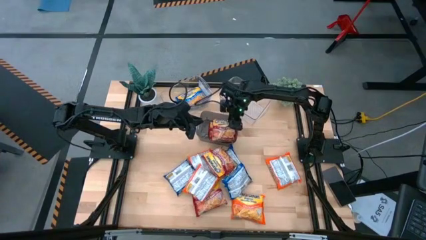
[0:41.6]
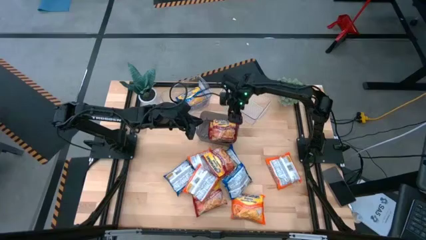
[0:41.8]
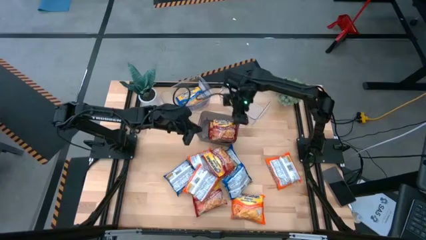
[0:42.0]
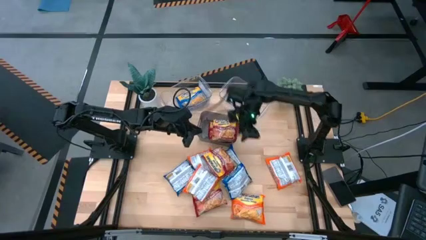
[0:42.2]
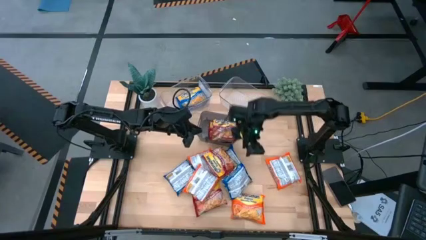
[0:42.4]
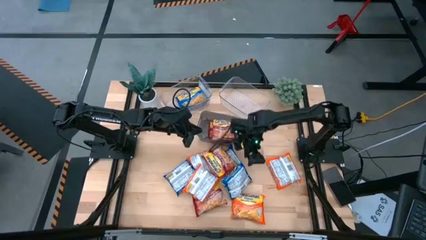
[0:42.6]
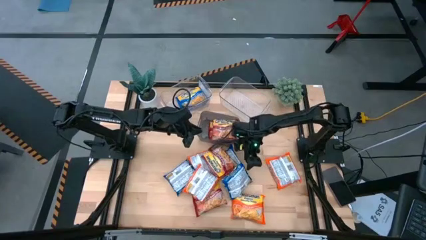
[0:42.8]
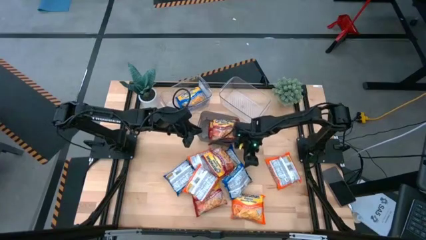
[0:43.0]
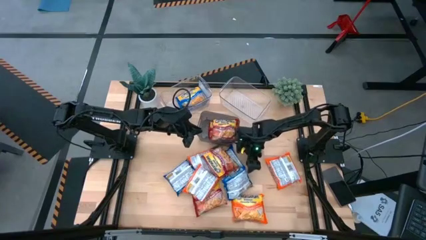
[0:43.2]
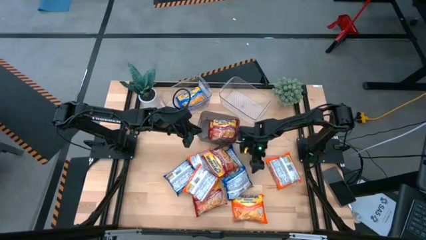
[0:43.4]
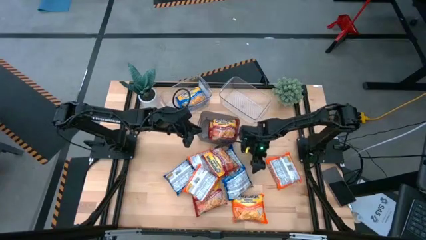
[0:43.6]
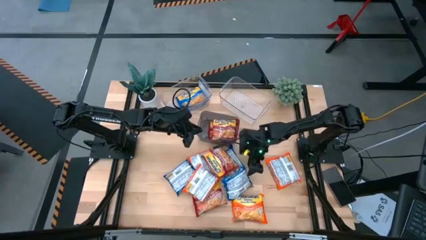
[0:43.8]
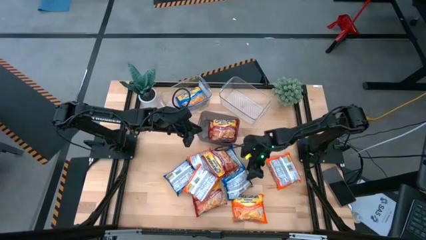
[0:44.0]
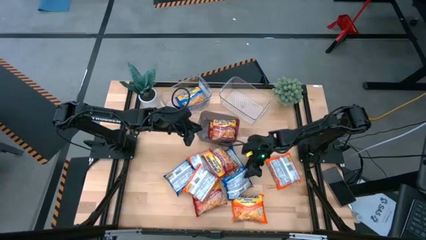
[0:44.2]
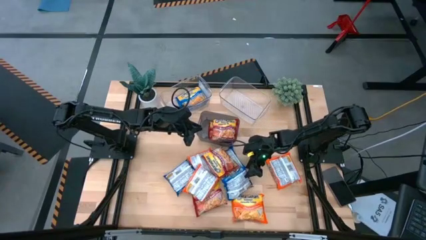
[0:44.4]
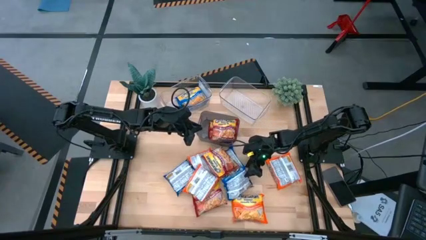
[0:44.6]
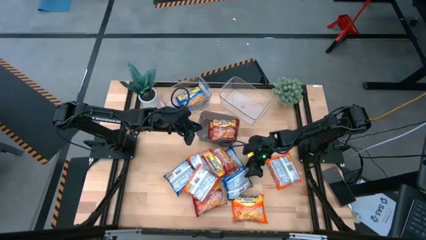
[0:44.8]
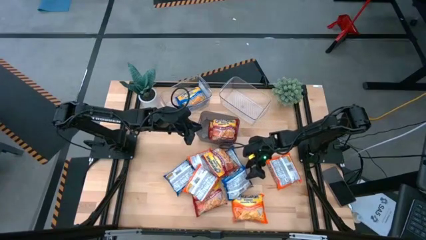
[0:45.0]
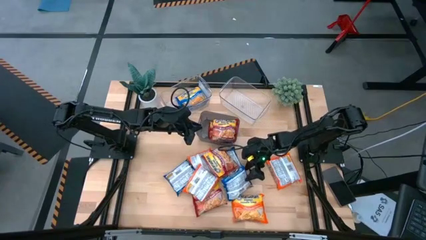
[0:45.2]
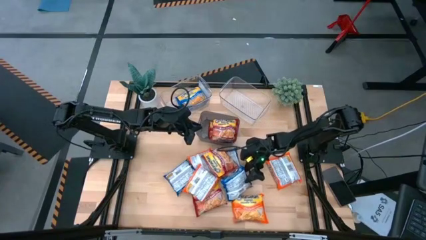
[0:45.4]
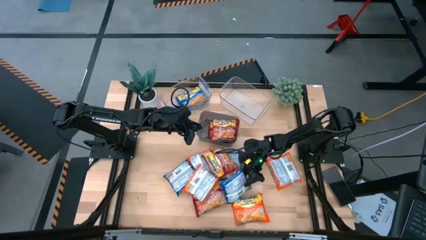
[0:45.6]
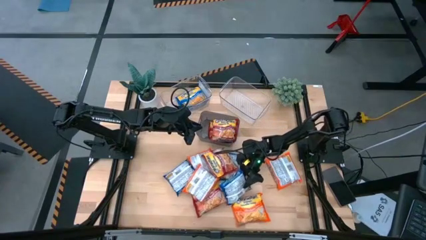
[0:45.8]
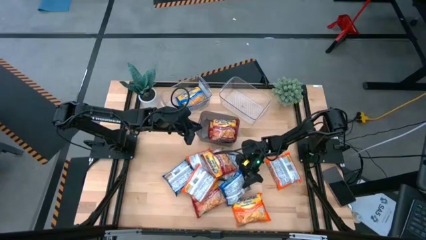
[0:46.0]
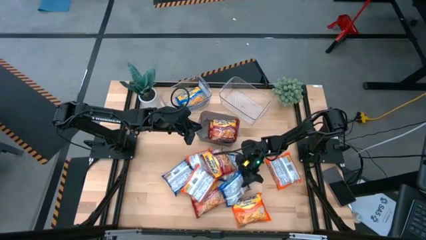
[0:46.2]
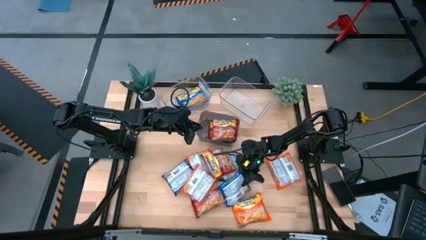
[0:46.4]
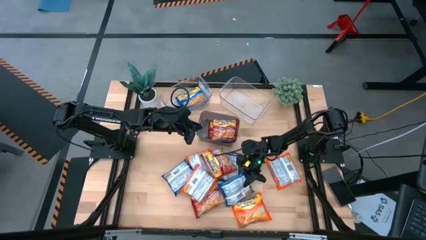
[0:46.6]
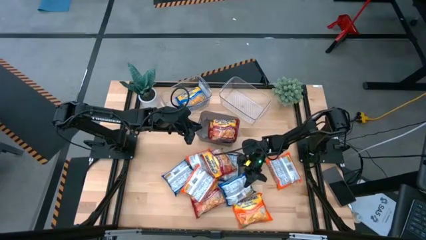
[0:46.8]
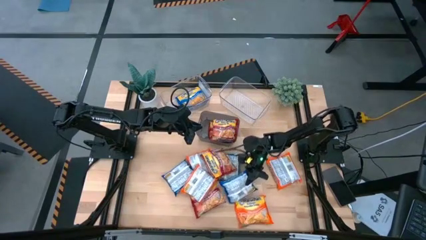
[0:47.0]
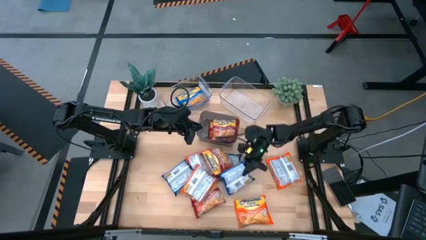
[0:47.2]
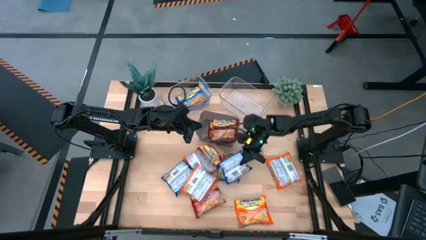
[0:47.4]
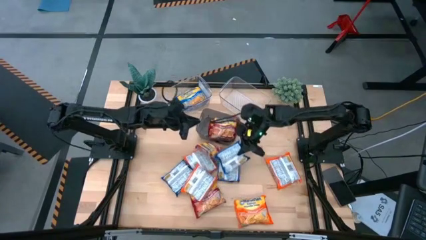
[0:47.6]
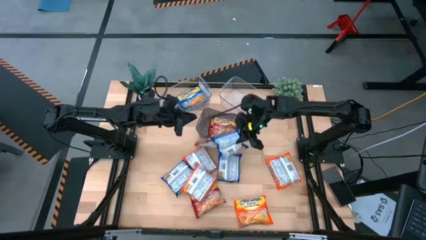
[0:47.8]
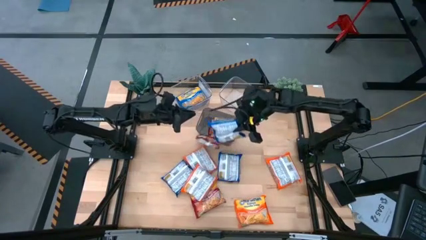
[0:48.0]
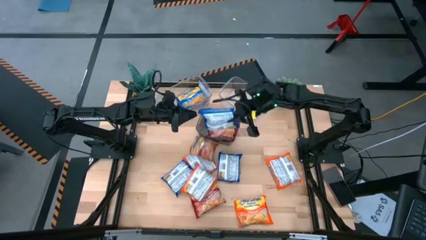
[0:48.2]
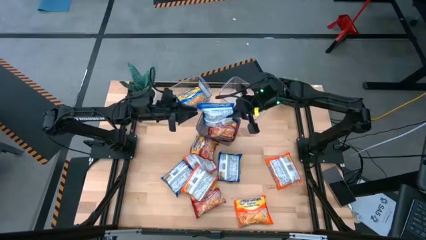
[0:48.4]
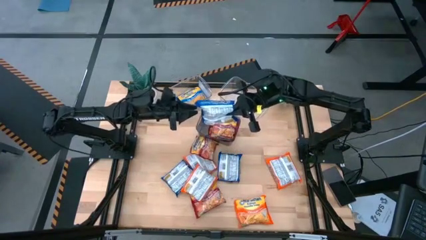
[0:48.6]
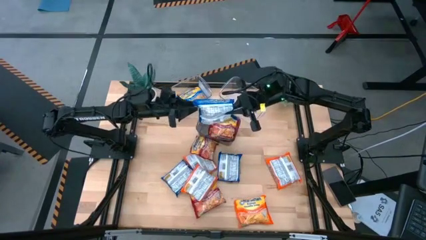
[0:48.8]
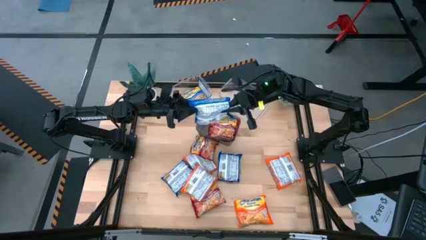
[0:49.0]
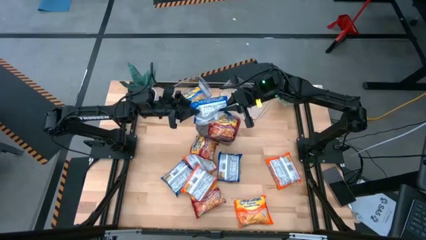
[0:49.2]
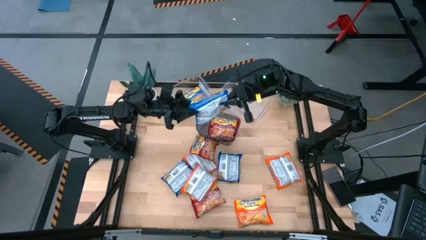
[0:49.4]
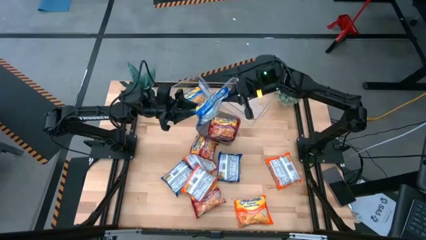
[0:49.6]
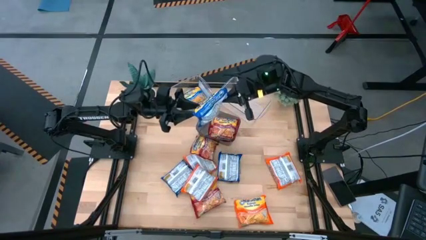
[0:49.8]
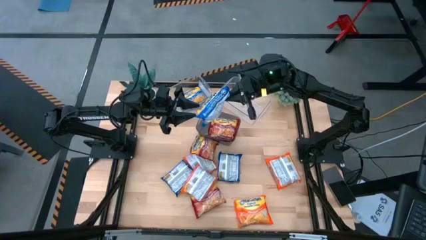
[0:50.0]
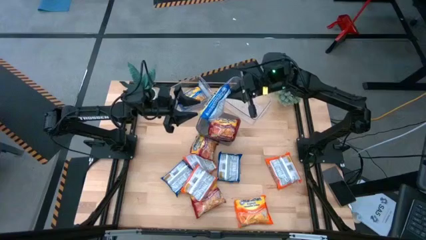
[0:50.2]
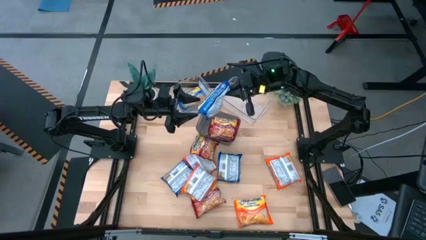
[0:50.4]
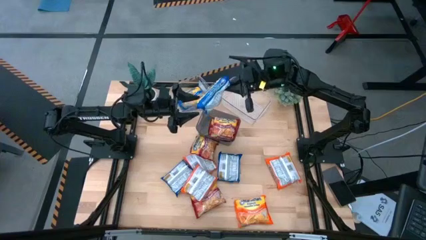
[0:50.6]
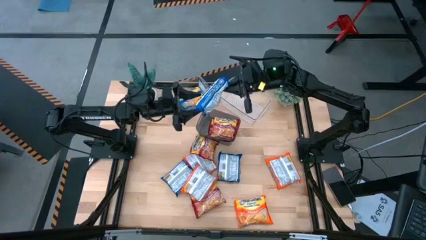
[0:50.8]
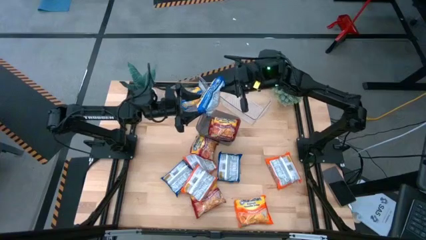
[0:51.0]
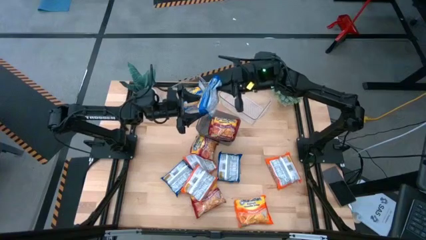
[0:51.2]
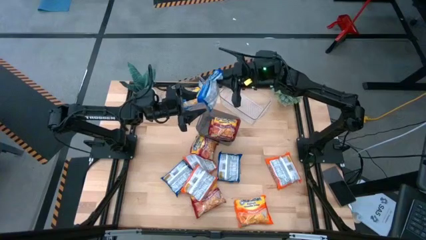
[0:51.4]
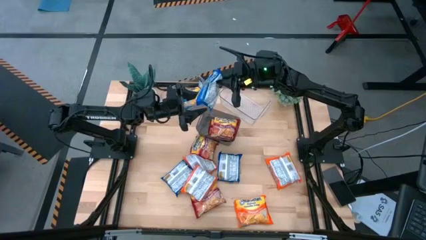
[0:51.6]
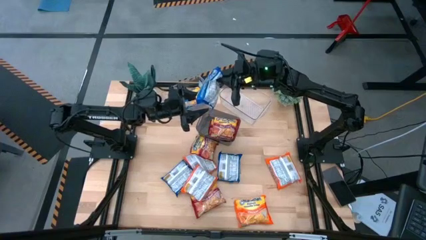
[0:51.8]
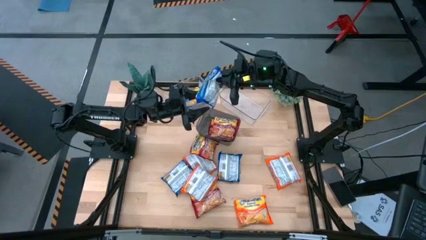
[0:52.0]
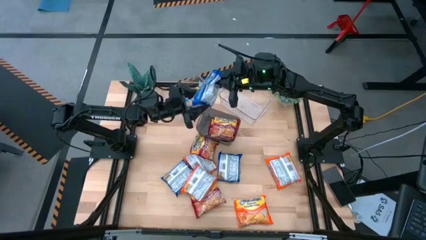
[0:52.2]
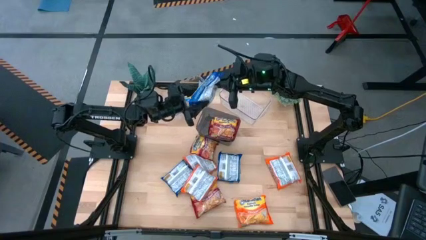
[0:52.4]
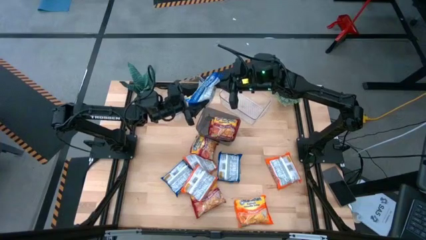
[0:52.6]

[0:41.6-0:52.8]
Task: Sort Maruchan noodles
Stack the blue noodle pack on top of the blue noodle pack

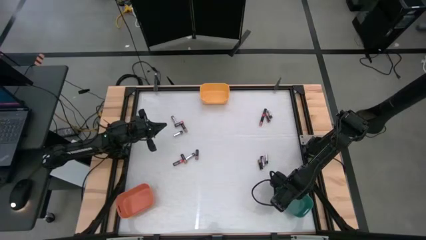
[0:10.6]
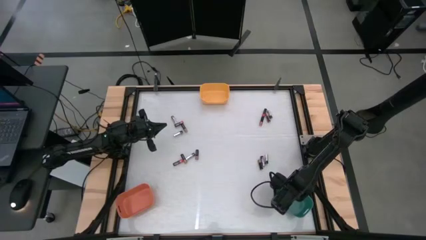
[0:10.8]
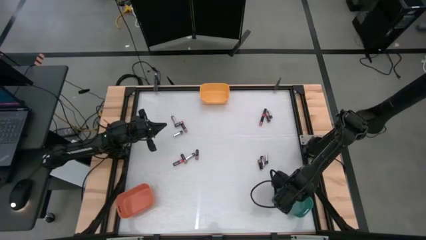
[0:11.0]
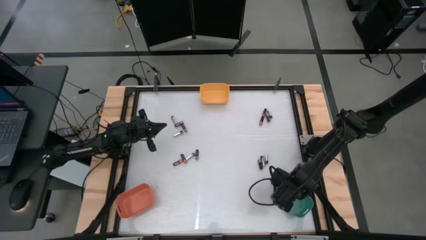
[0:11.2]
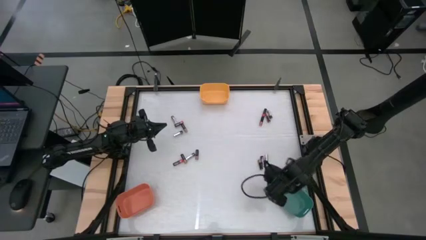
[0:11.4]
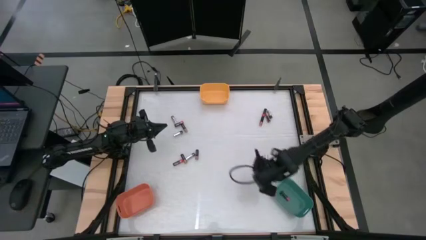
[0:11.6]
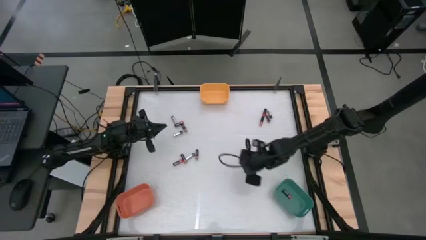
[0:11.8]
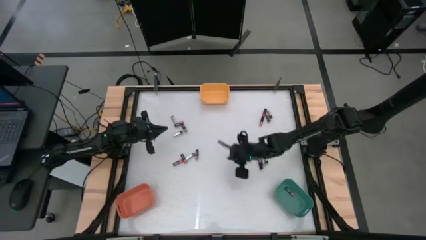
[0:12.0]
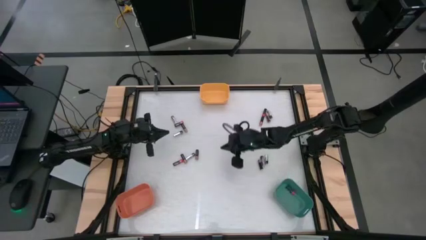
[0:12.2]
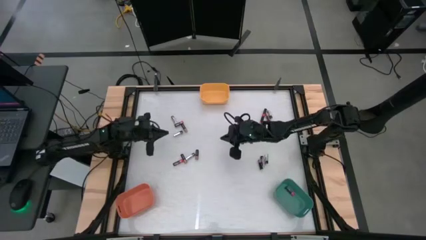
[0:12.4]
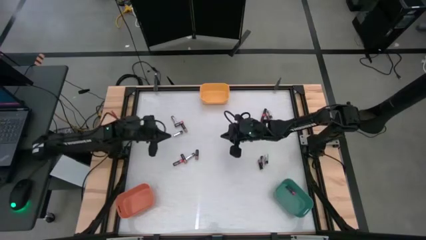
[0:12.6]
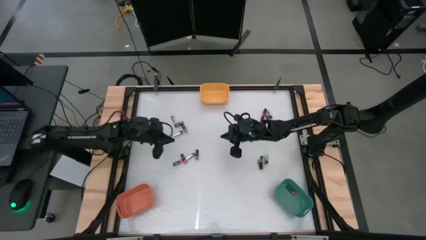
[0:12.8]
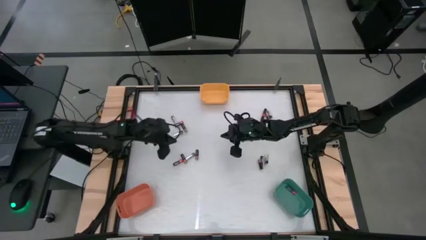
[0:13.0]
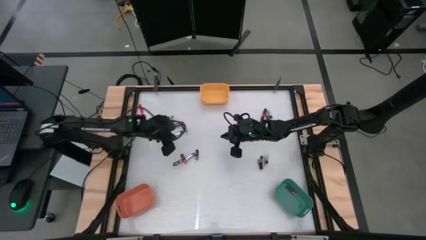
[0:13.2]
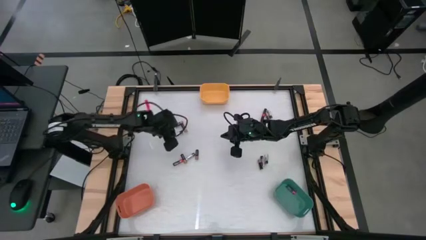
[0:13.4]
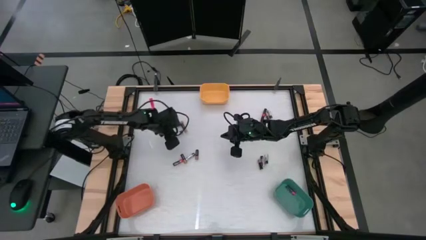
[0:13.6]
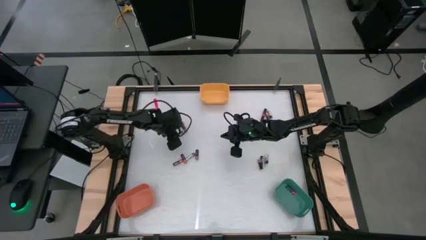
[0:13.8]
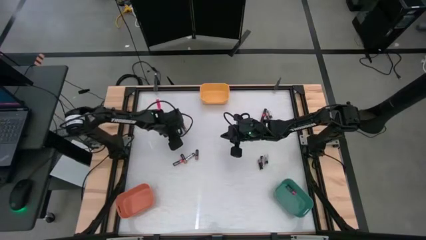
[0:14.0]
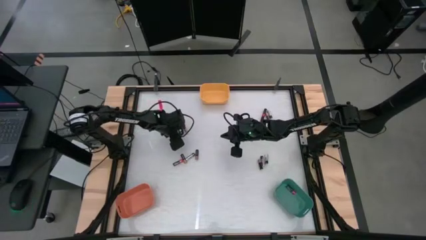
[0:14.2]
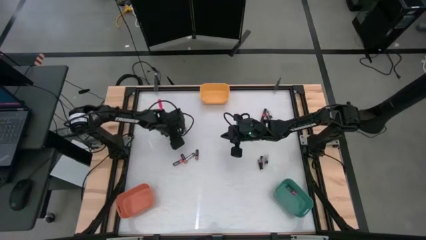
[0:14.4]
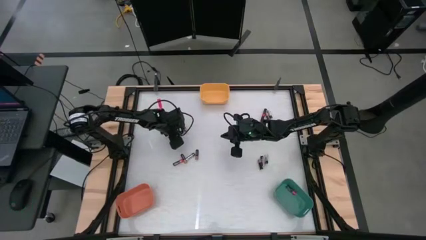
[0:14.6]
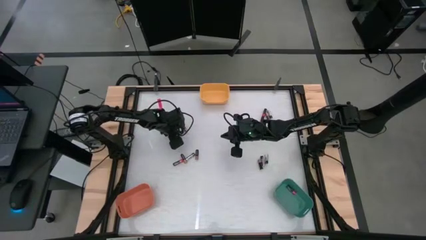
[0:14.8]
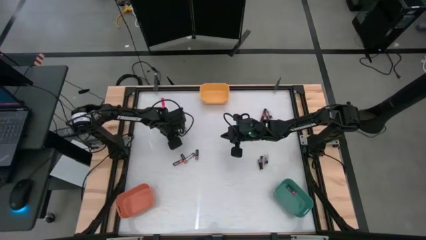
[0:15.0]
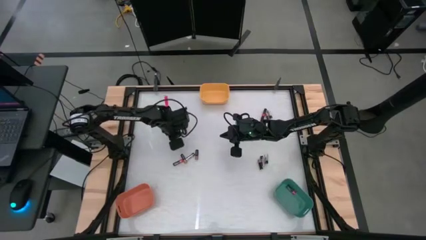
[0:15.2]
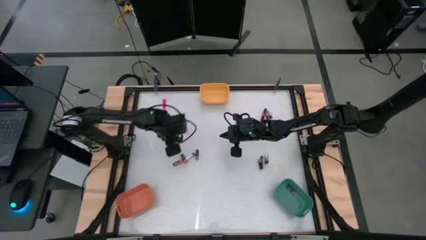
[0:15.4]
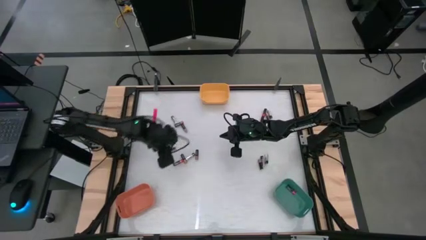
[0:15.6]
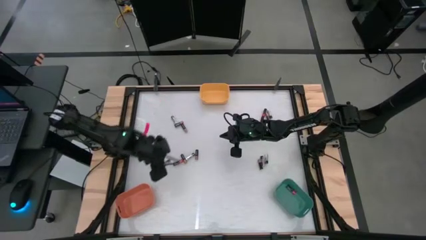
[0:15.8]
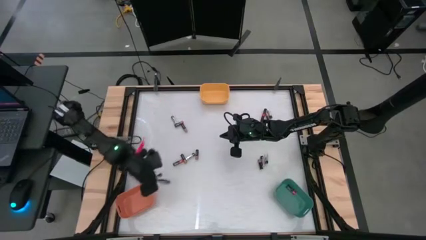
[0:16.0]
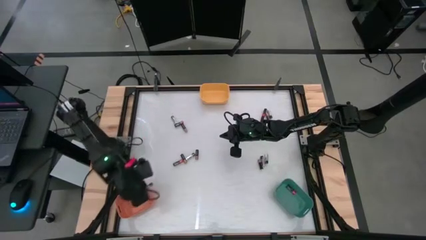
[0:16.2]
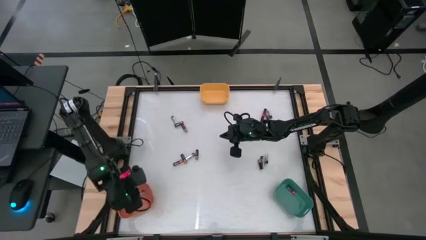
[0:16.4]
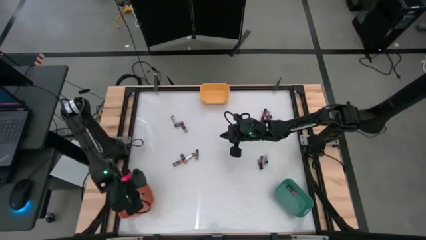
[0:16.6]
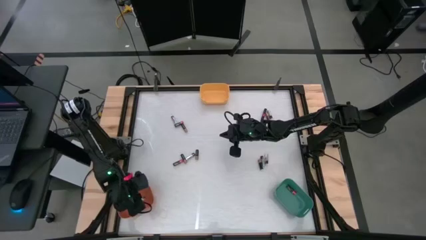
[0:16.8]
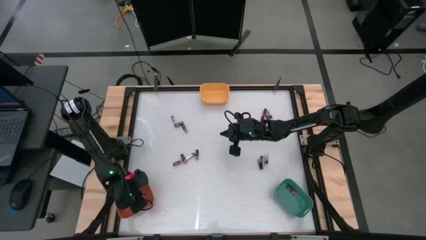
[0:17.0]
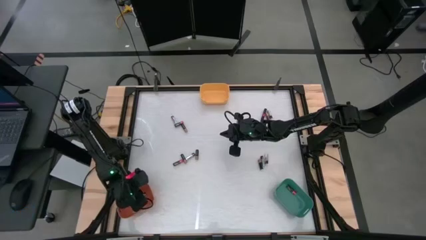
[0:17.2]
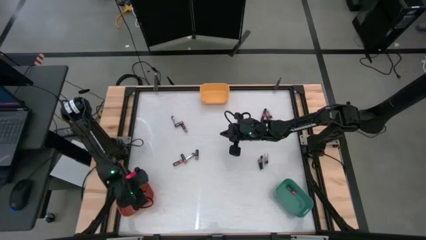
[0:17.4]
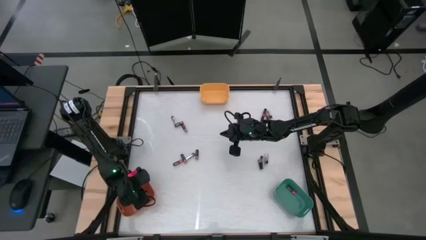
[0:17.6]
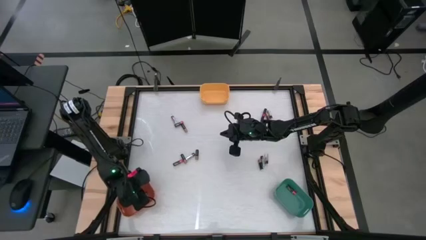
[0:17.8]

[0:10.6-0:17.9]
Task: Sort batteries
Put the silver battery into the orange bin
